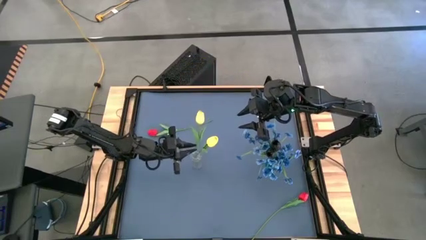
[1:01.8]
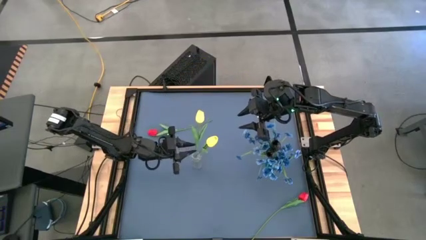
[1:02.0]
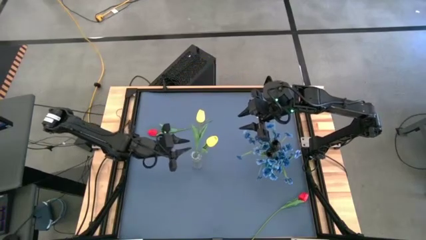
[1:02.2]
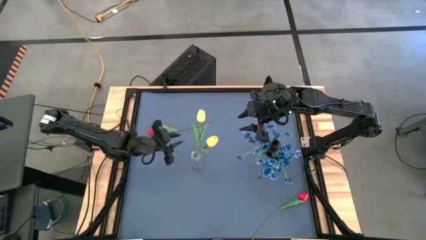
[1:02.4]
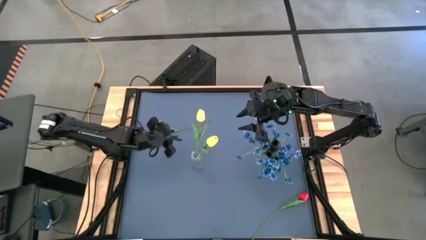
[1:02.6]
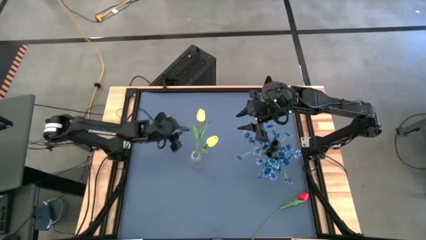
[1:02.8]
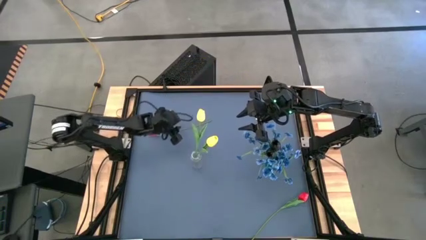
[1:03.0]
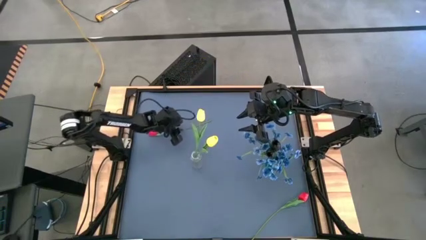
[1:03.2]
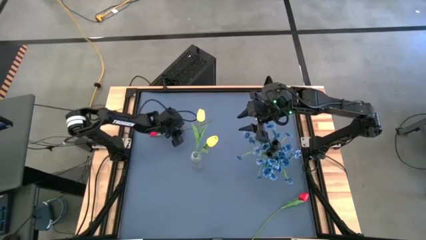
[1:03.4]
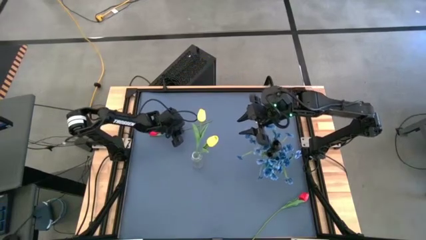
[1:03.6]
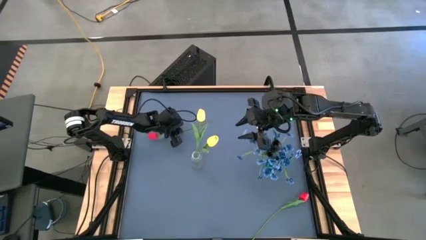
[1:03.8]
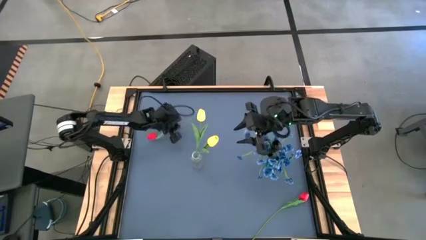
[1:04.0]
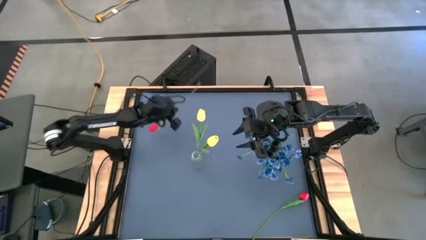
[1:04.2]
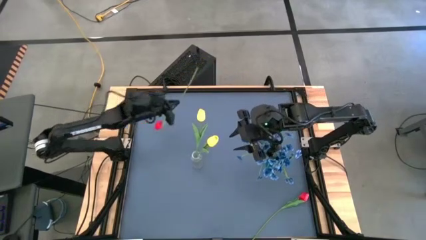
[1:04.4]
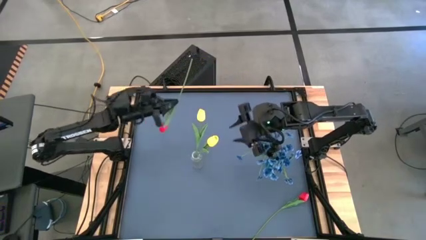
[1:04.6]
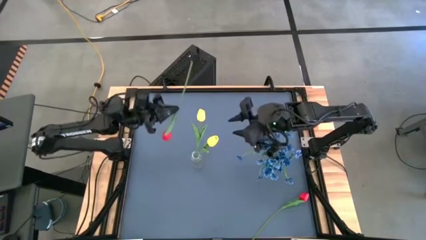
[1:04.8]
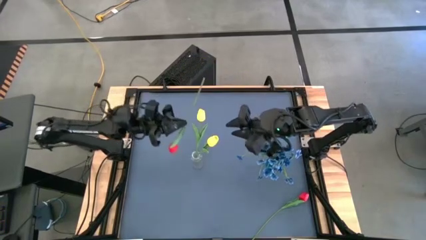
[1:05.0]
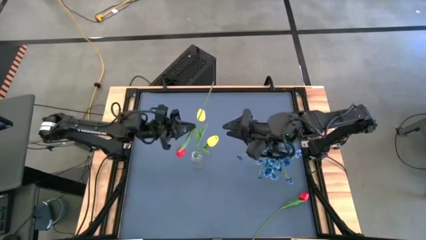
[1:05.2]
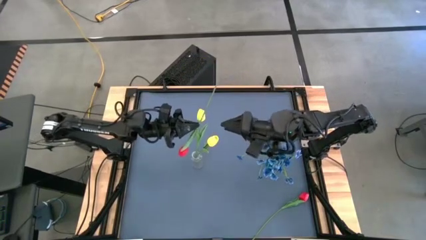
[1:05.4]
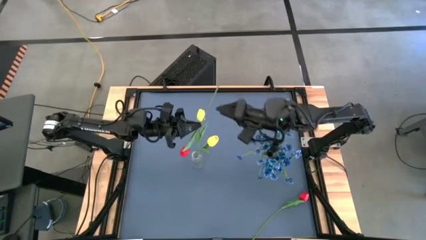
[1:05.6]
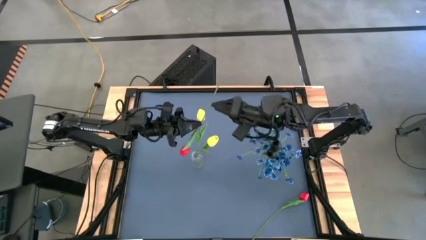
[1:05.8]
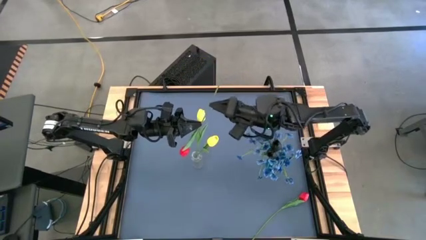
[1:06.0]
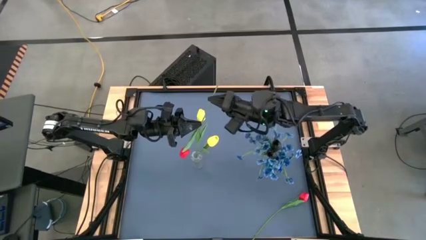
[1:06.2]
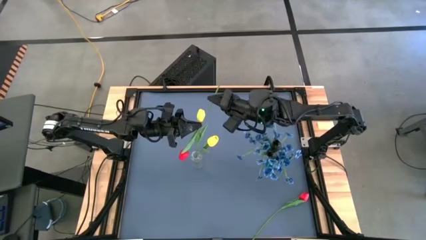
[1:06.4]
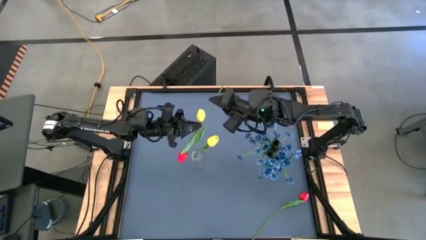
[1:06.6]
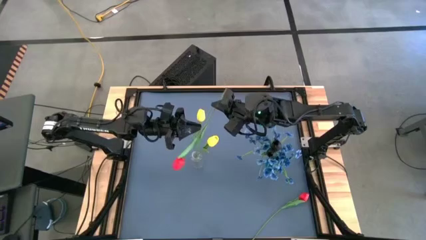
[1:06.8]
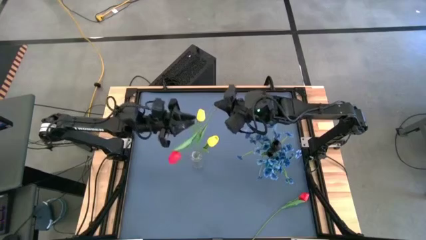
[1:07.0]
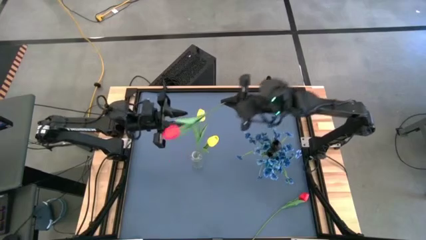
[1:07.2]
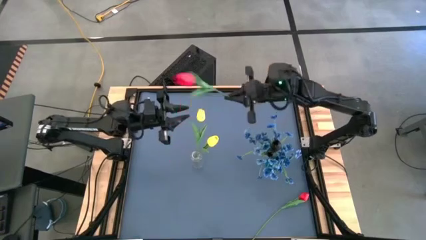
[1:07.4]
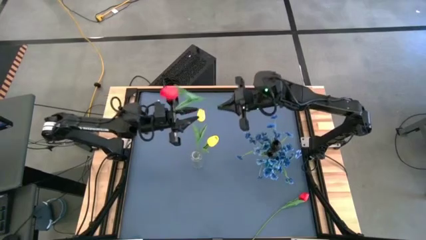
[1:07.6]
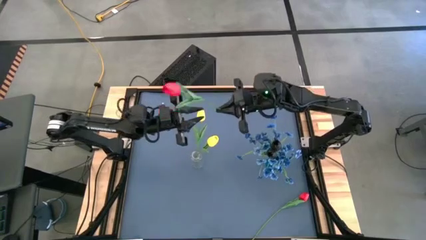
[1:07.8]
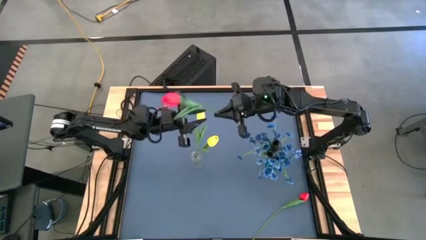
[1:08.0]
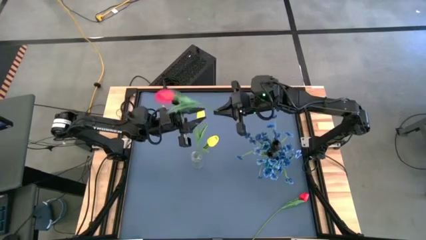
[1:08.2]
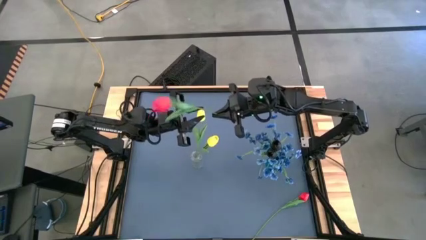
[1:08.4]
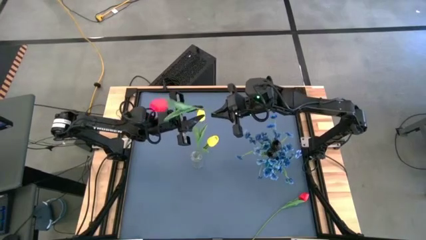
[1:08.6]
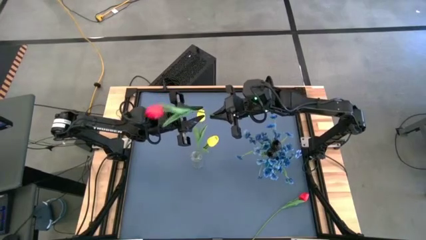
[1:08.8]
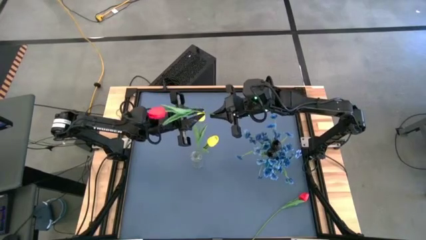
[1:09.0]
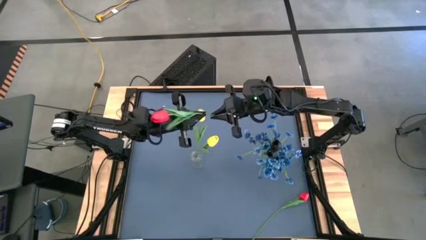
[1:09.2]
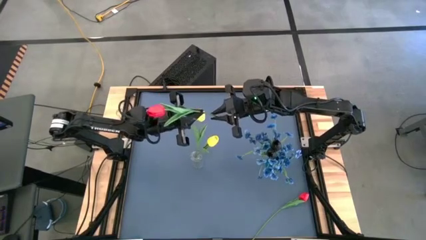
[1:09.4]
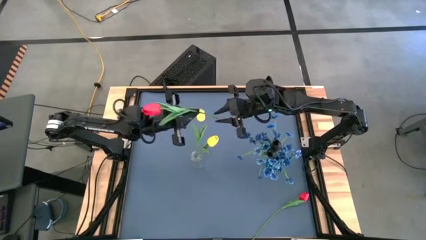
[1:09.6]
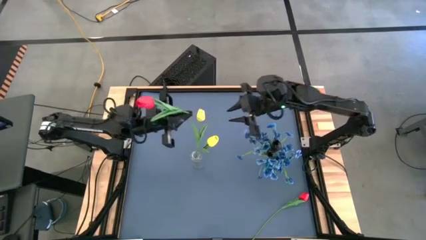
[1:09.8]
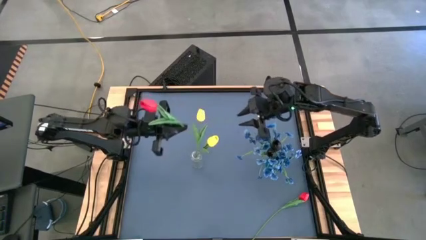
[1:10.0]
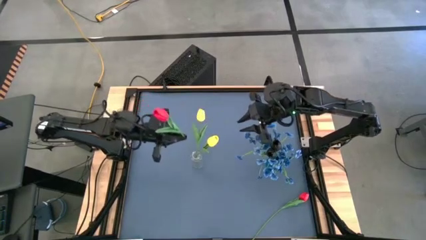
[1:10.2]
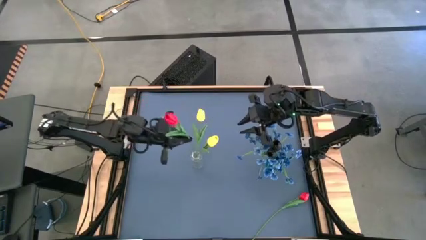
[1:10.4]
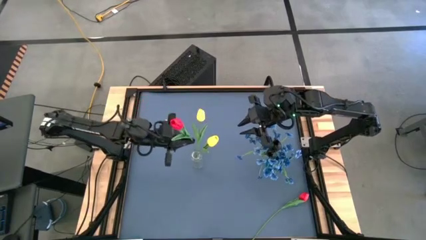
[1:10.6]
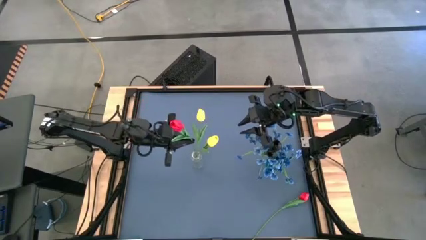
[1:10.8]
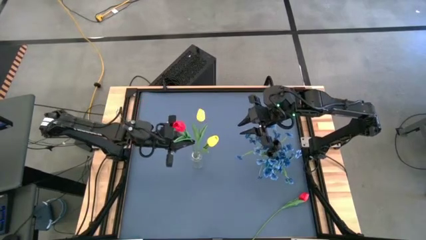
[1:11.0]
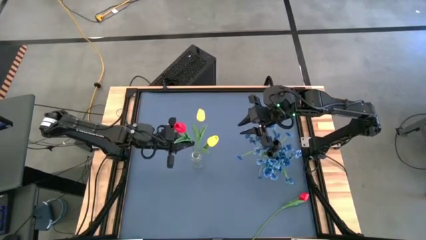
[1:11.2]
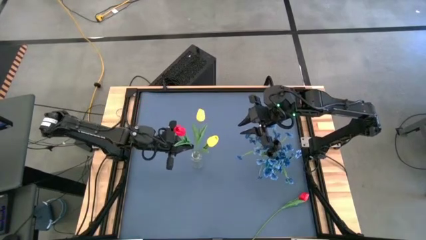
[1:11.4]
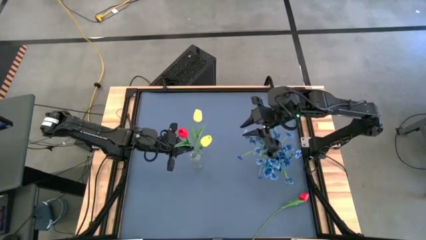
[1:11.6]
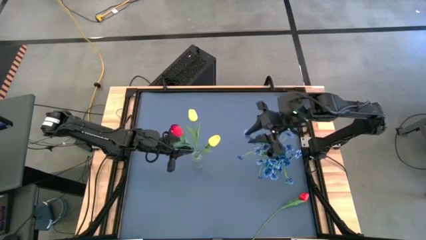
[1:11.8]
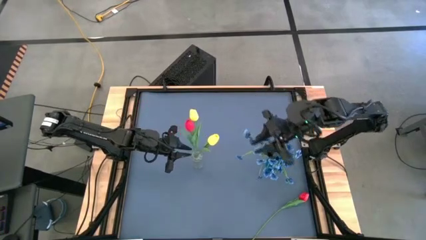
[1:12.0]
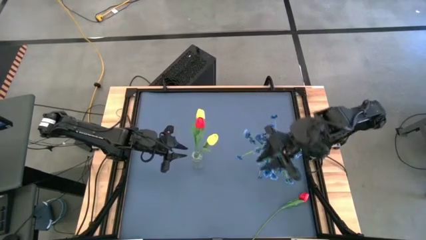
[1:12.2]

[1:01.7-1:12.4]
Task: Sort flowers into vase by color
Put the top red flower into the transparent vase

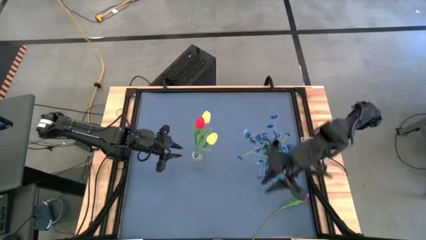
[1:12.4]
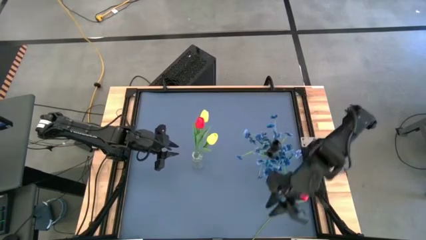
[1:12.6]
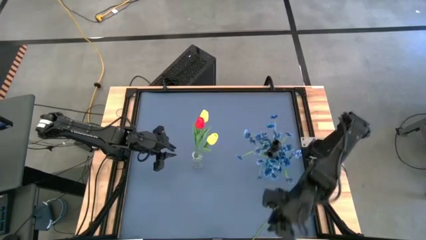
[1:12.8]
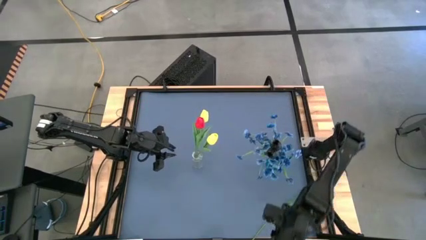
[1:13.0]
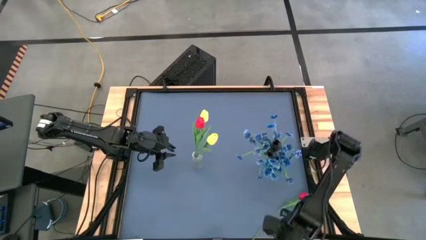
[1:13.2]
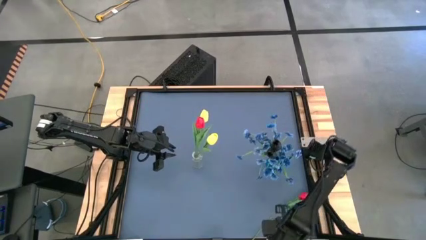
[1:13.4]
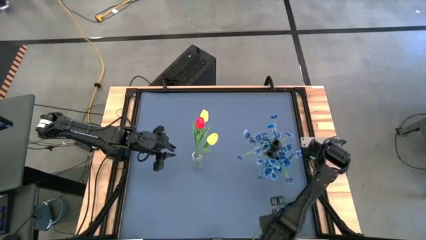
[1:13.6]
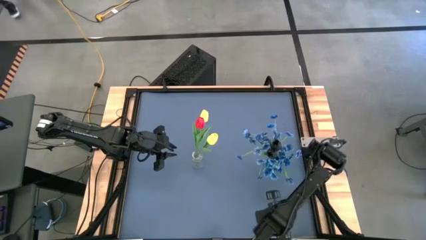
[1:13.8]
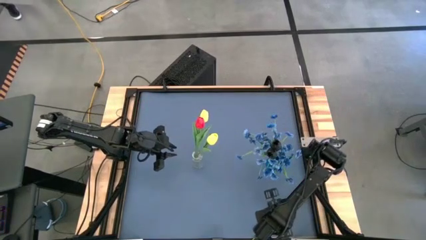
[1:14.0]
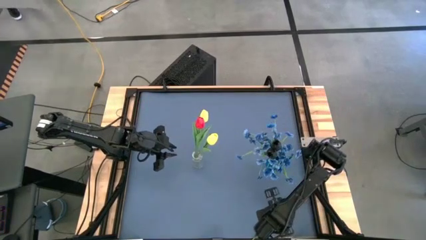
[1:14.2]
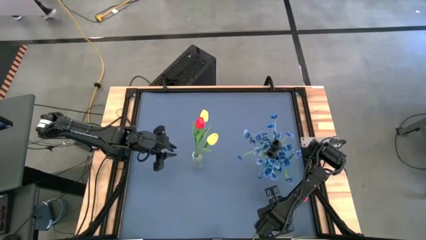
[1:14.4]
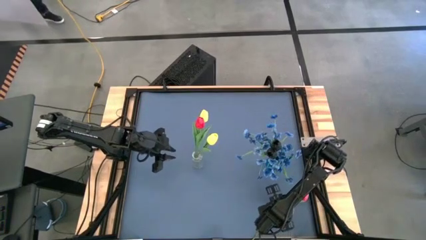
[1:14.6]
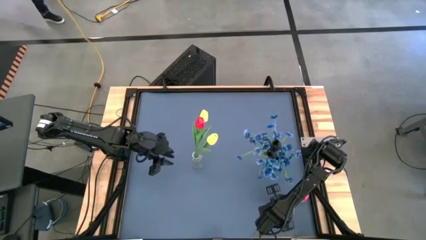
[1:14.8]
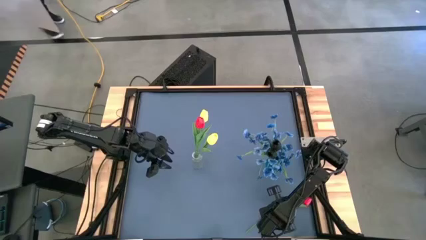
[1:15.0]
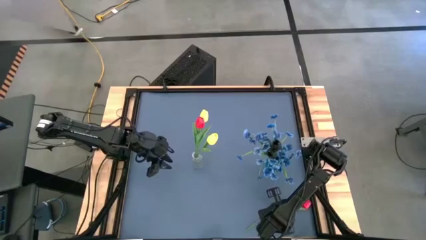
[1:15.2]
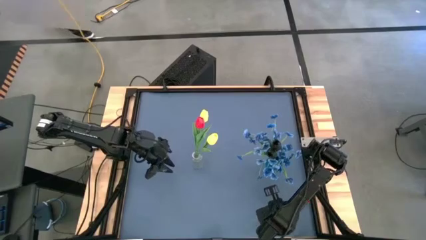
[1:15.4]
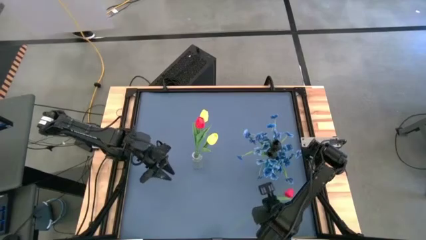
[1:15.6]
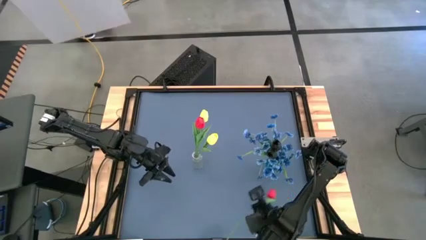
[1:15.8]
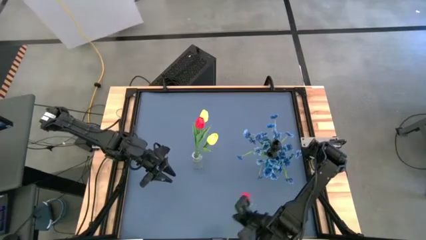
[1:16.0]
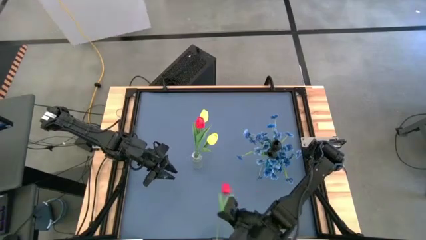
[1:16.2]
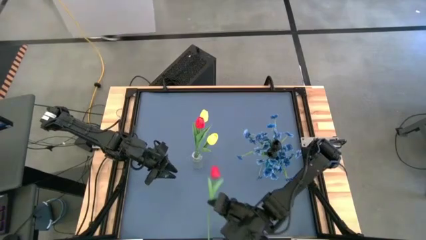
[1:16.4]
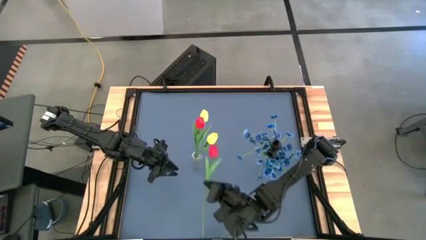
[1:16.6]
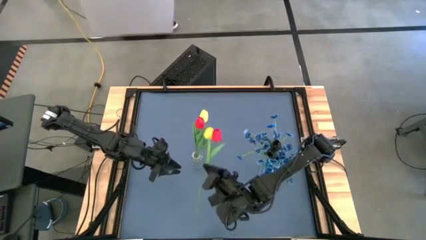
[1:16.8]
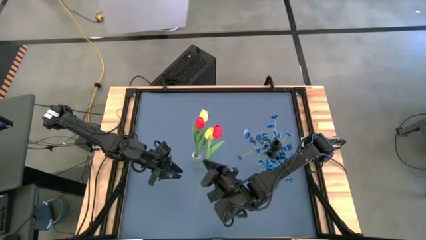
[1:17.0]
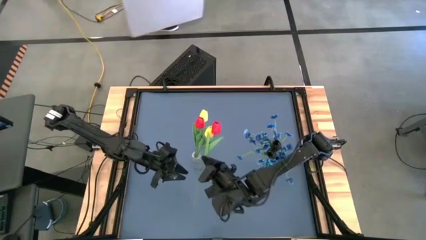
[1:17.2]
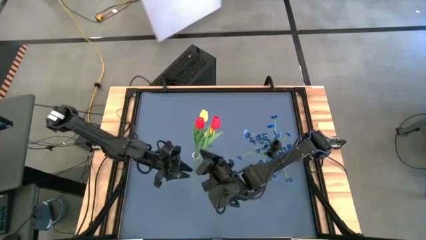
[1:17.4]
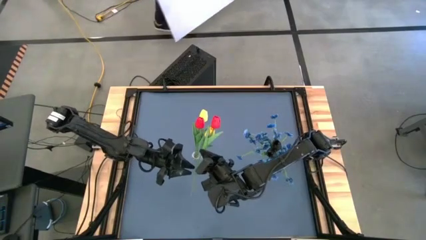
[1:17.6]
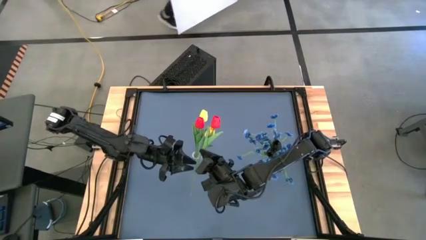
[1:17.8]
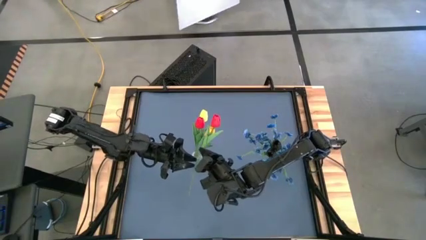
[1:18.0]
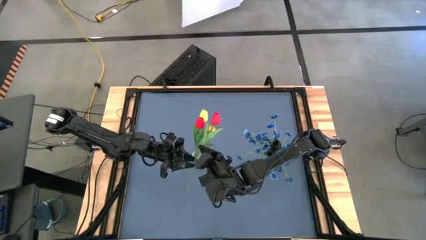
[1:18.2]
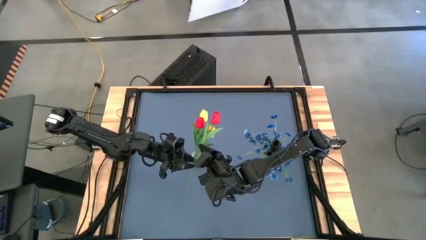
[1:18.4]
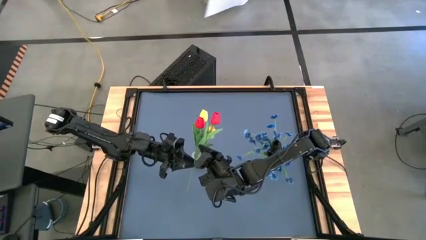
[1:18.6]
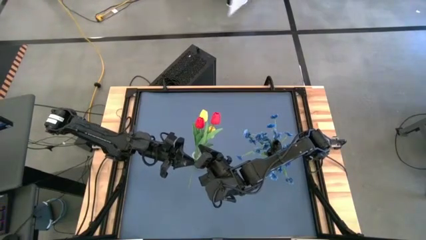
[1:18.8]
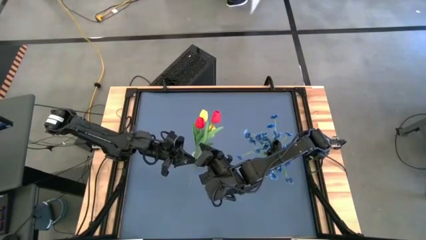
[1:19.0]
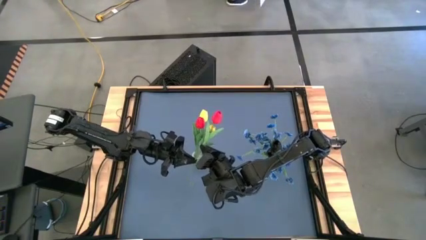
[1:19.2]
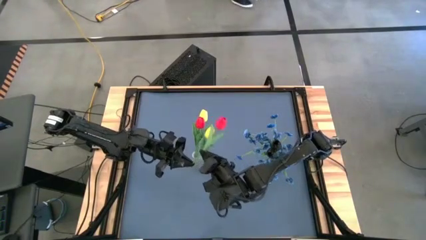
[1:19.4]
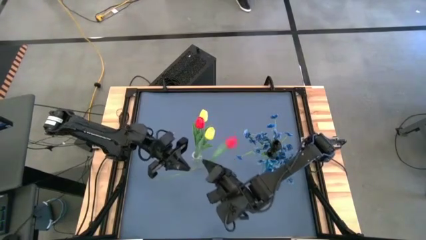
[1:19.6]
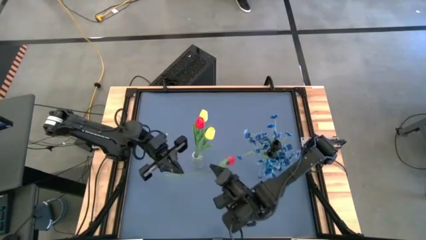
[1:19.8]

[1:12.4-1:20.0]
Put the red flower into the transparent vase
